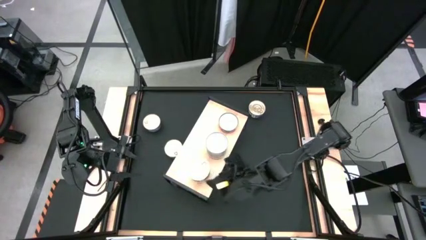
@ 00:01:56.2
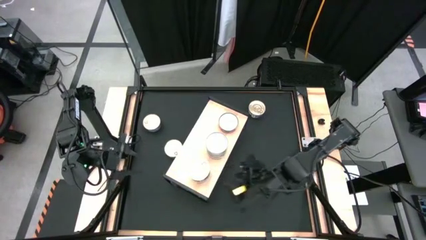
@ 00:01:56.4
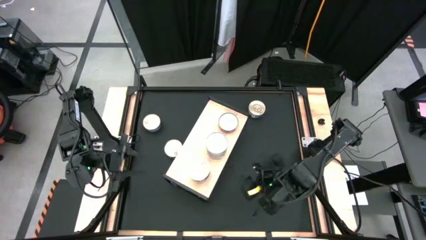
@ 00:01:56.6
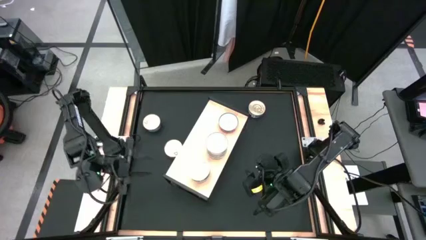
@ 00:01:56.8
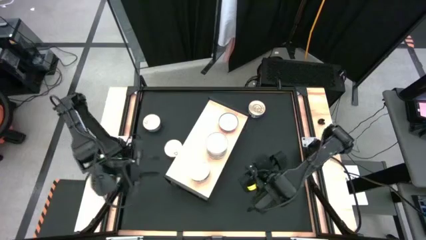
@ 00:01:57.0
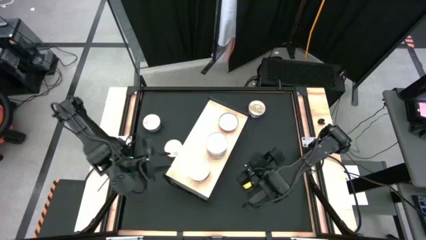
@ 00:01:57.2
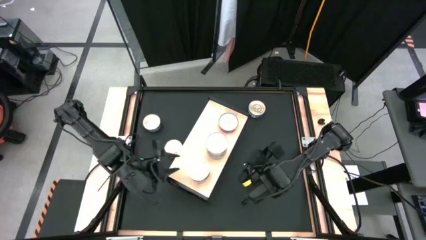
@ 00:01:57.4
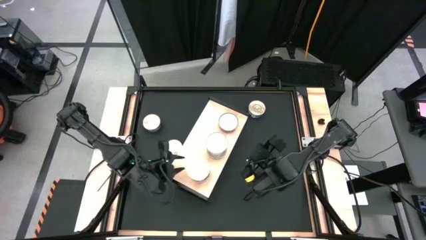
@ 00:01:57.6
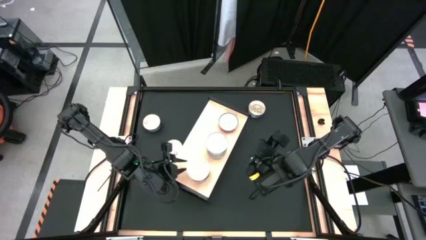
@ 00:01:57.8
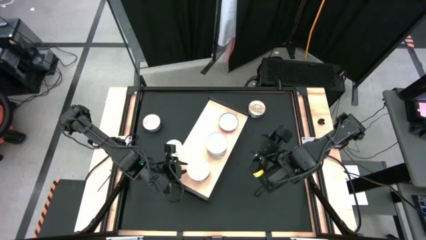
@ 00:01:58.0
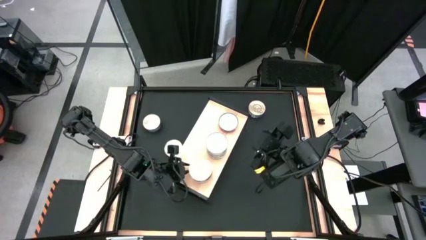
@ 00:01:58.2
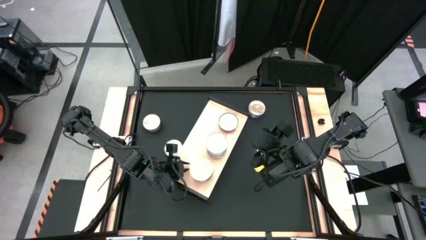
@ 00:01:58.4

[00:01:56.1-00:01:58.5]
Task: Stack canned seafood by type on shelf
Adjust the stacked blue tuna cans on the shelf

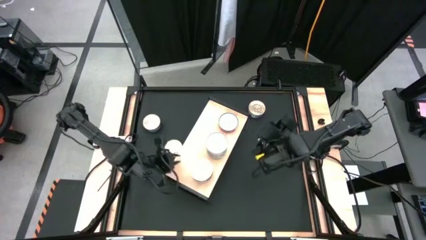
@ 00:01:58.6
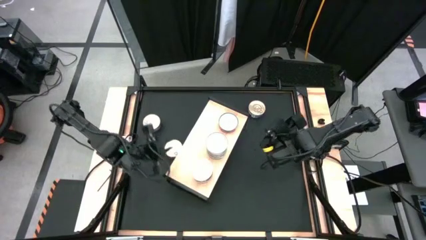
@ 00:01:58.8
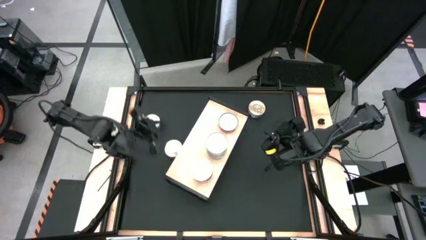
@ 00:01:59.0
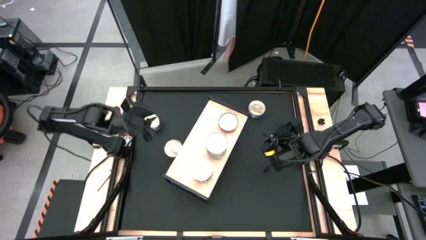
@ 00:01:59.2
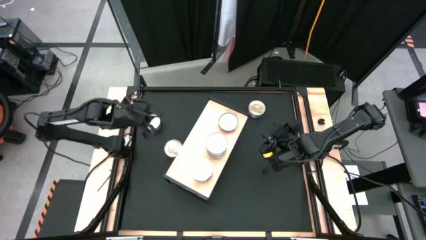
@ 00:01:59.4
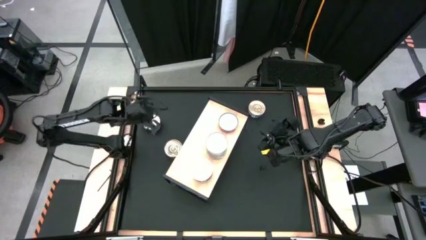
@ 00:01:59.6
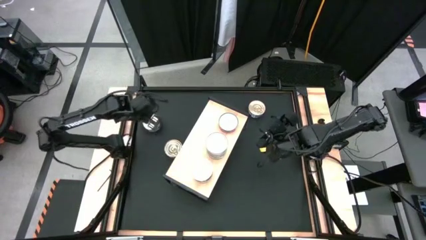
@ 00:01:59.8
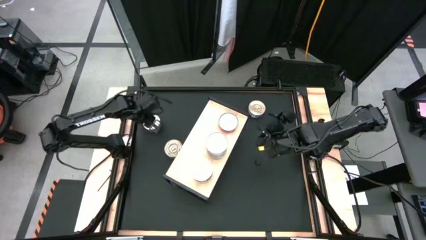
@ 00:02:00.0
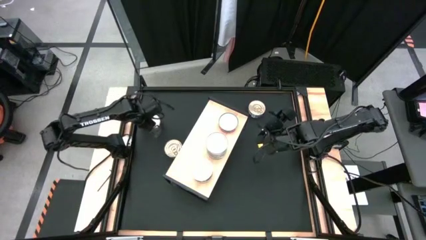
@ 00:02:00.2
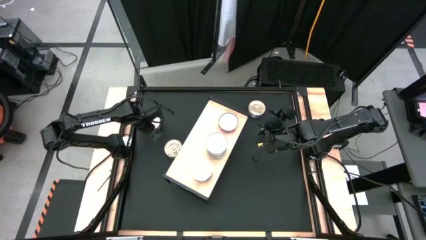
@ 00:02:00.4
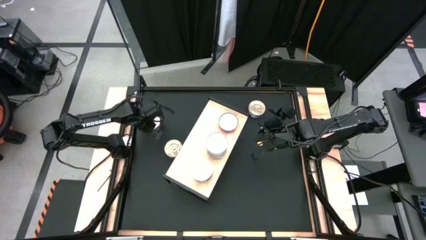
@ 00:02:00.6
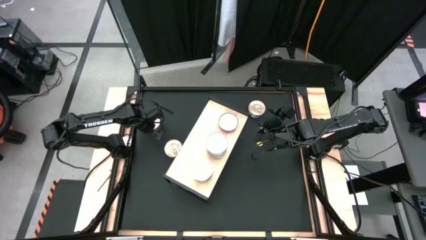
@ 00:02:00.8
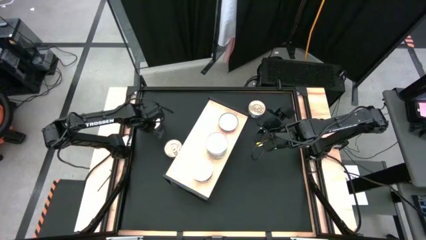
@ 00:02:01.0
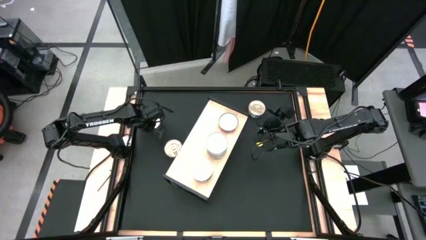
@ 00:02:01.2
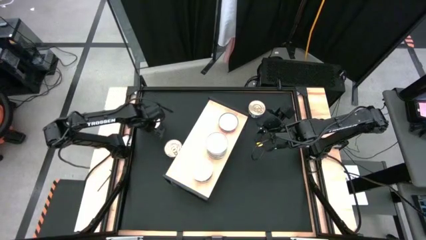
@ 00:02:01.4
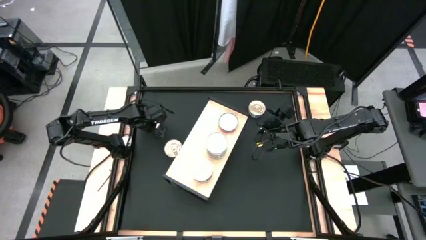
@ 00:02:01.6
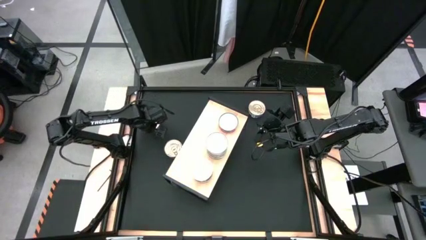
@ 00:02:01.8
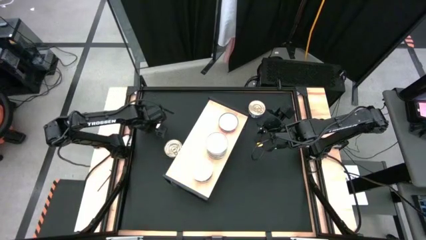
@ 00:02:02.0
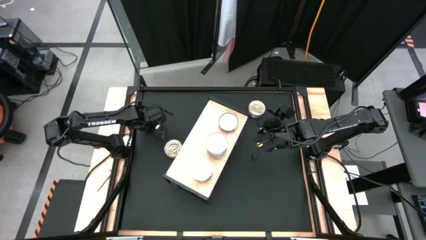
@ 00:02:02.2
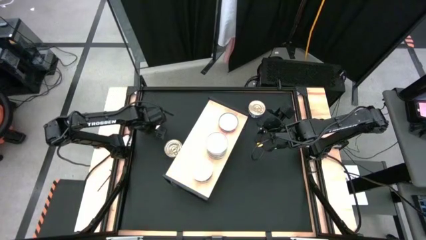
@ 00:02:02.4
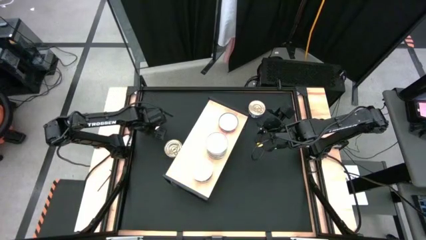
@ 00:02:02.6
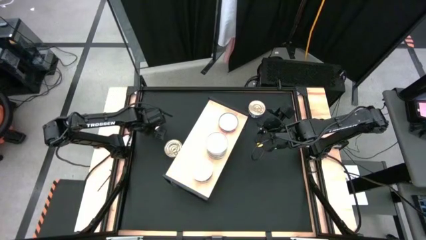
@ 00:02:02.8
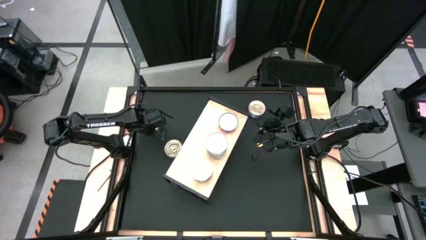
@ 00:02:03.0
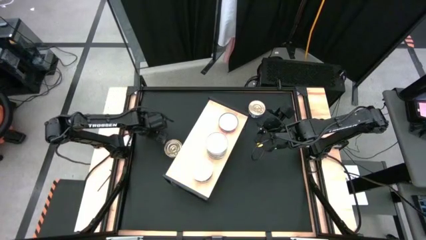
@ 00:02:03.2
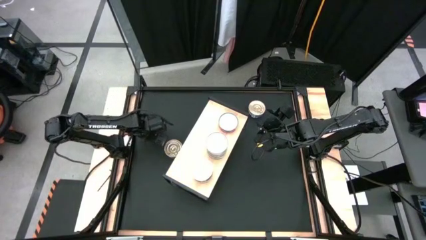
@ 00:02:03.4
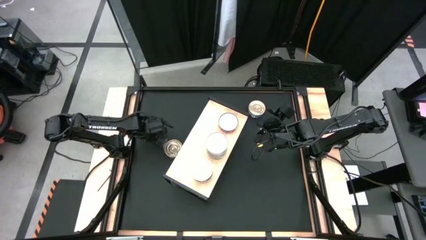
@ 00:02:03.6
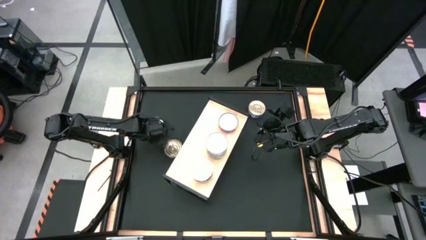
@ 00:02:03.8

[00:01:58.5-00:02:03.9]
Stack the blue tuna can on top of the other blue tuna cans on the shelf

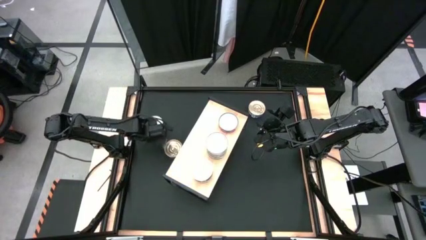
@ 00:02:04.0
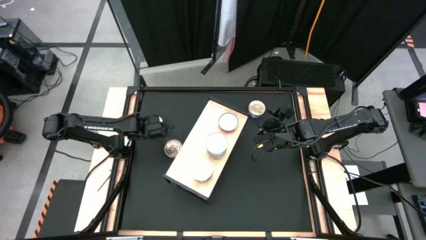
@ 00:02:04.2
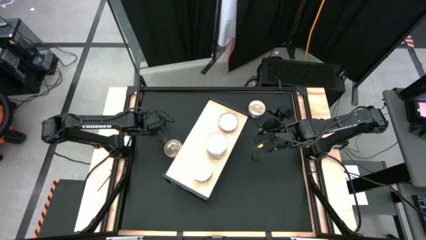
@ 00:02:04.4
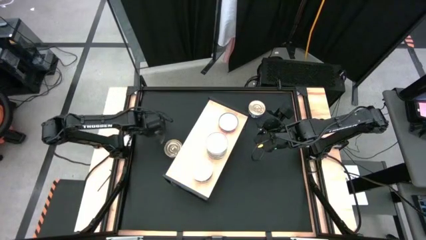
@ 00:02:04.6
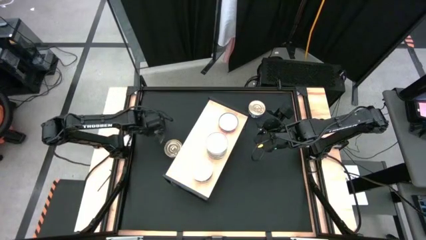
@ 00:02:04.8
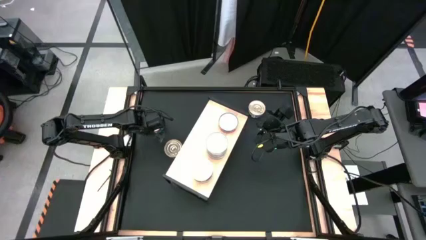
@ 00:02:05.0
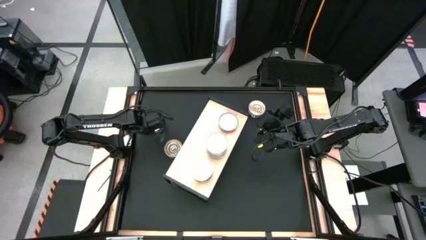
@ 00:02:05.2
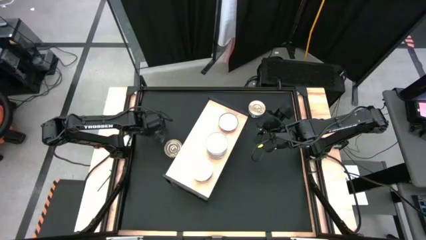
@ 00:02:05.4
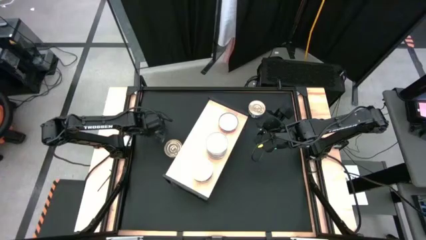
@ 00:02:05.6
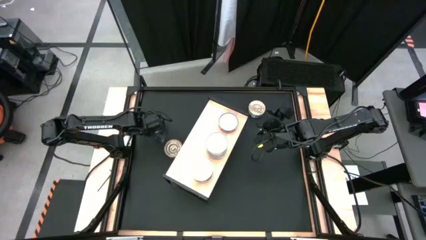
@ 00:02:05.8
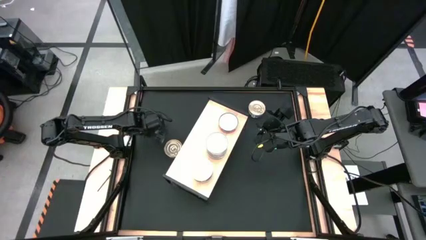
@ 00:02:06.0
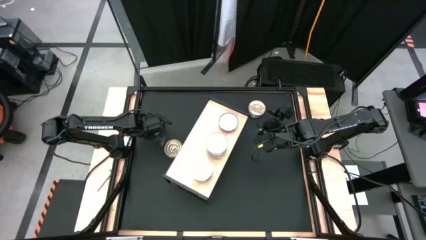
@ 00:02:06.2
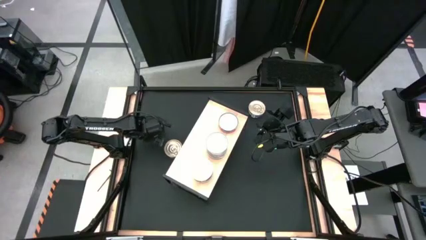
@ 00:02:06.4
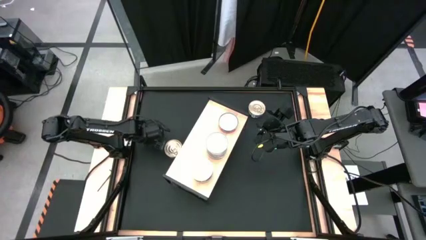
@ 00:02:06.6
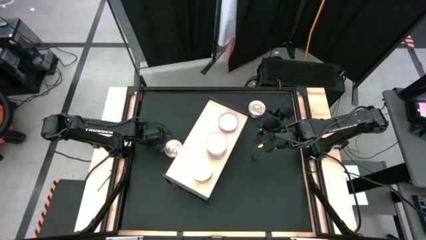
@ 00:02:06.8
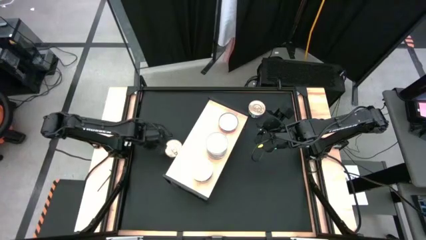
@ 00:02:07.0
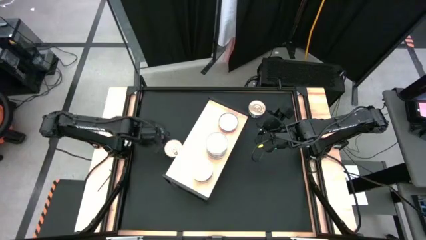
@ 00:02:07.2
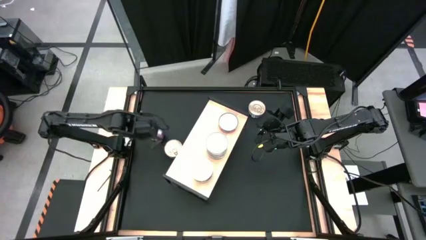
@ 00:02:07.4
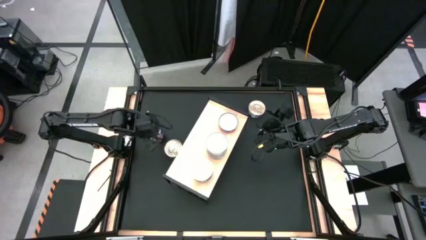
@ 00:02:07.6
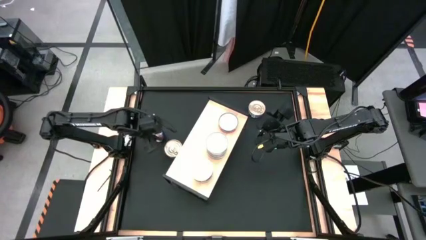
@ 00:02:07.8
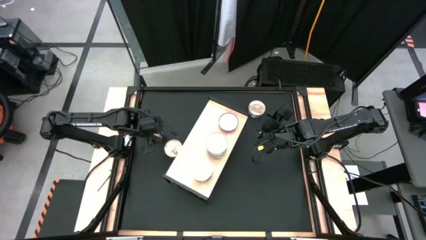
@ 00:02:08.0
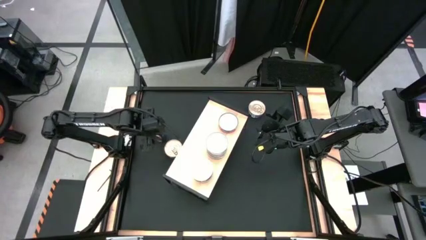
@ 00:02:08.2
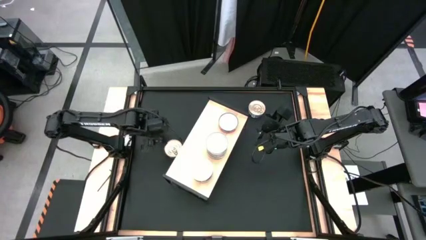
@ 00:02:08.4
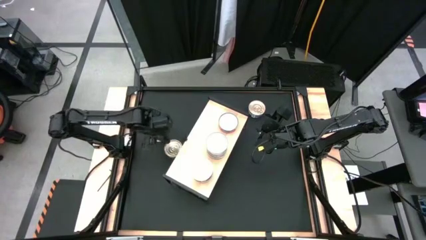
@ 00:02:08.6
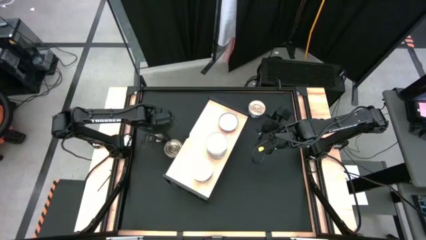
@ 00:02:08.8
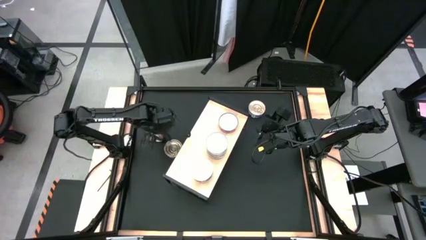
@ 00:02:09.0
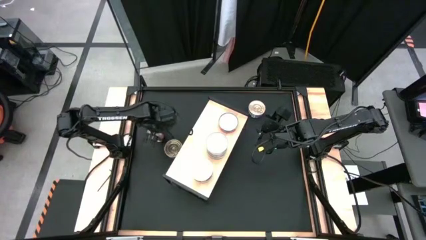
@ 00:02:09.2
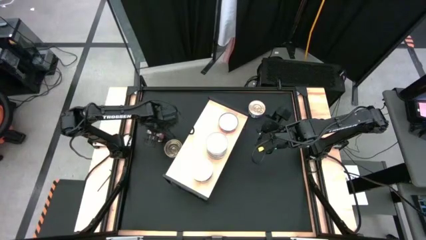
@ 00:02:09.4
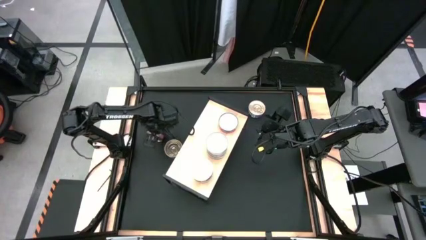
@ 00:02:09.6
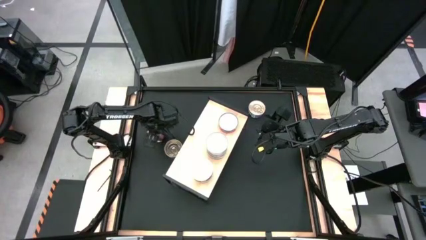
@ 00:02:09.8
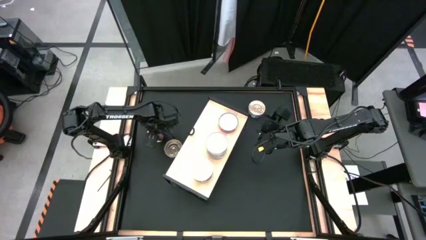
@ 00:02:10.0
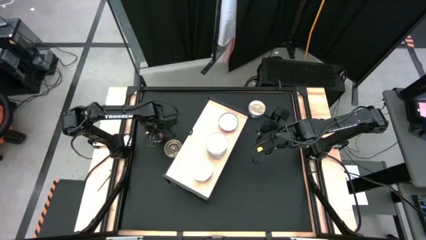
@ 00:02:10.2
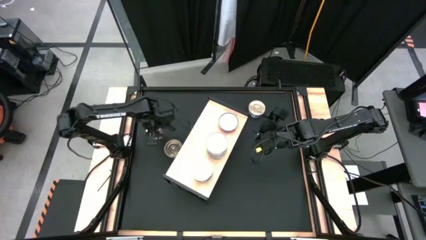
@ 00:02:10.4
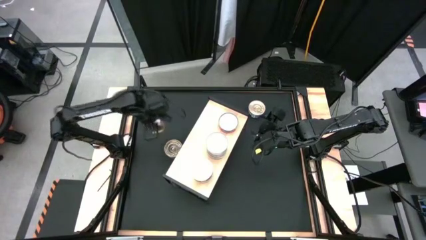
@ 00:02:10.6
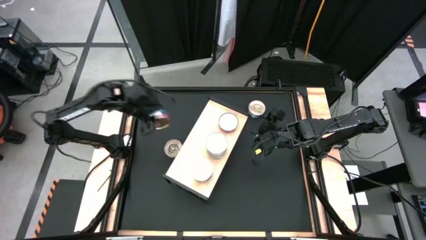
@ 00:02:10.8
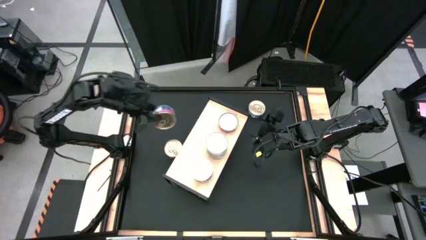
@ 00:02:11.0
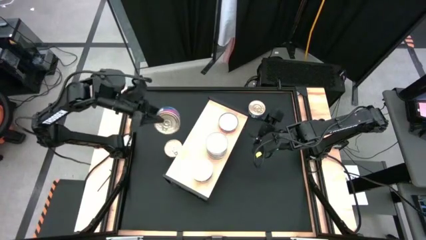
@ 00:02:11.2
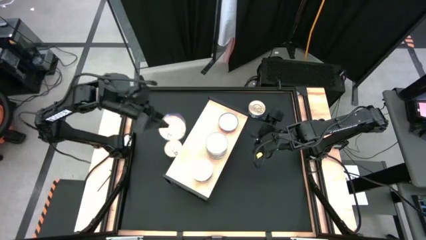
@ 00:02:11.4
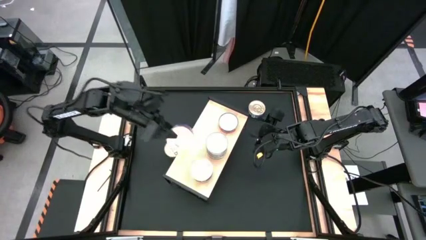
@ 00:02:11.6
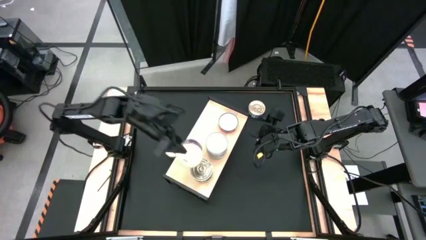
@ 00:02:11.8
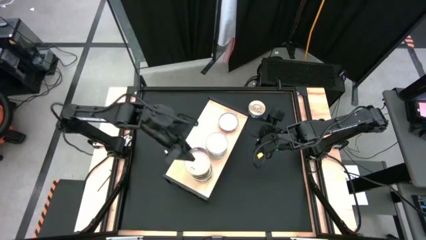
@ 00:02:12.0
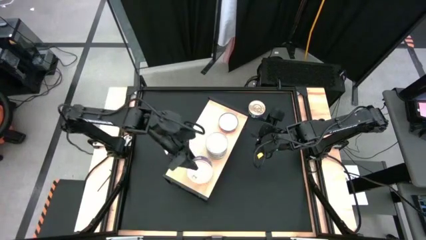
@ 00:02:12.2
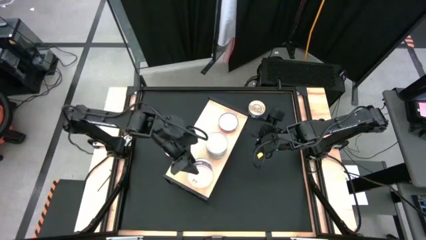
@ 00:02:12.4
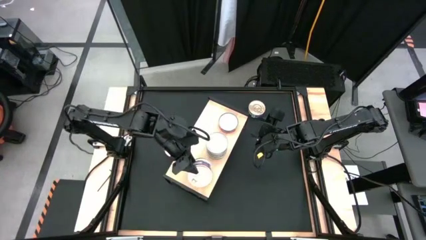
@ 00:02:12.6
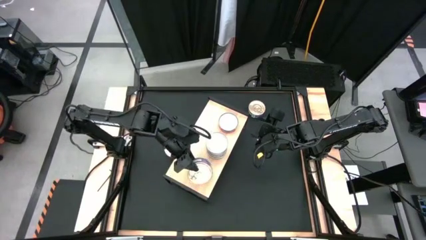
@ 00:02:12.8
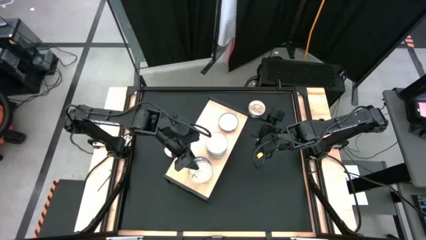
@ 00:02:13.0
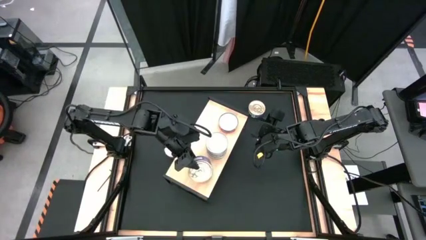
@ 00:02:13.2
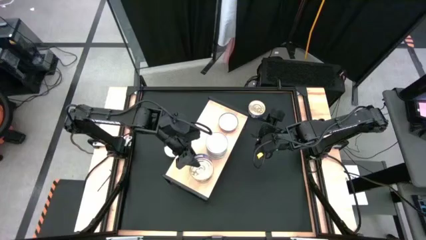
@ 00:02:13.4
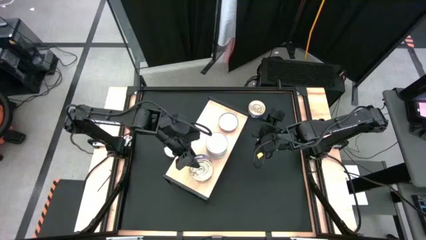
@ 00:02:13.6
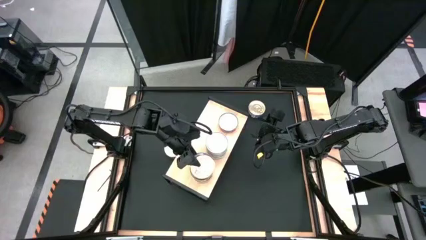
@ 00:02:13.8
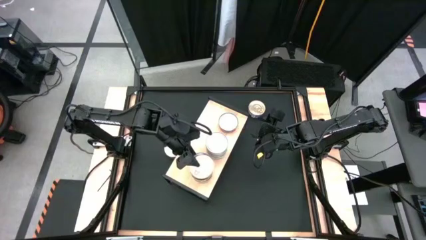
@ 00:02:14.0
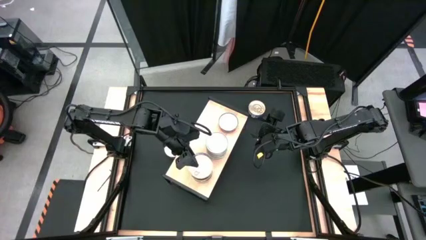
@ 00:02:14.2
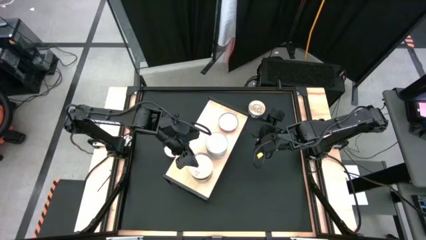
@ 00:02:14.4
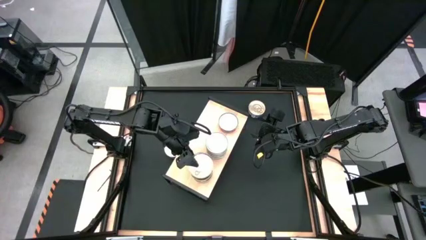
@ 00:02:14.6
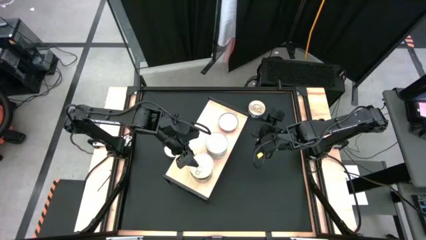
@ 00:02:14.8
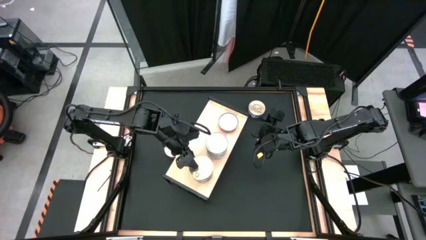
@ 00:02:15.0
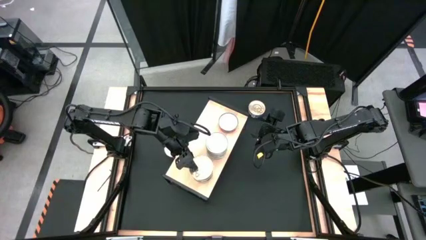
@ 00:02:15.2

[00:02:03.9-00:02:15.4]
Stack the blue tuna can on top of the other blue tuna cans on the shelf
